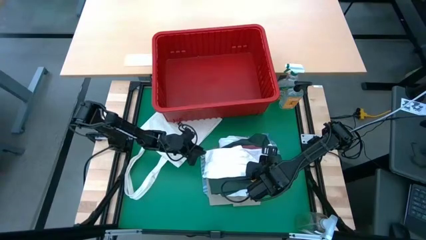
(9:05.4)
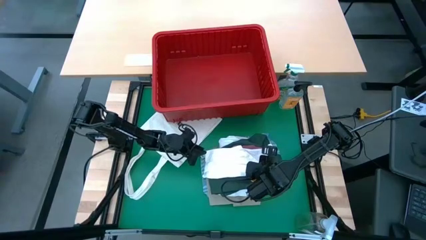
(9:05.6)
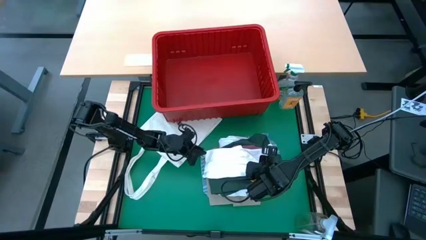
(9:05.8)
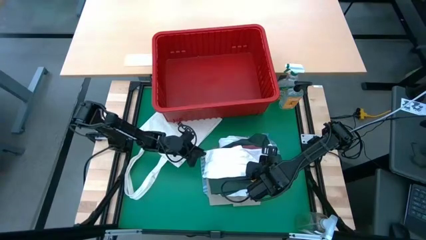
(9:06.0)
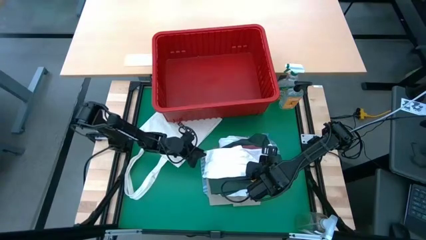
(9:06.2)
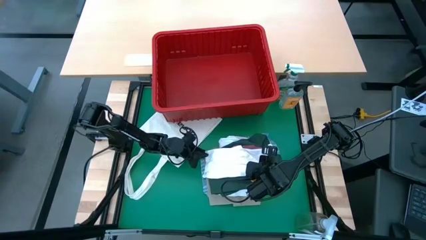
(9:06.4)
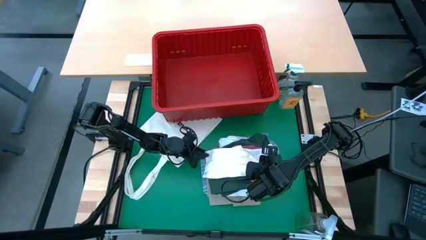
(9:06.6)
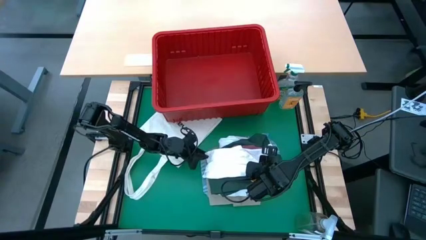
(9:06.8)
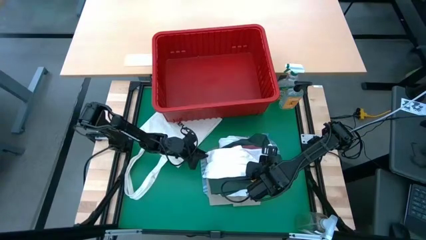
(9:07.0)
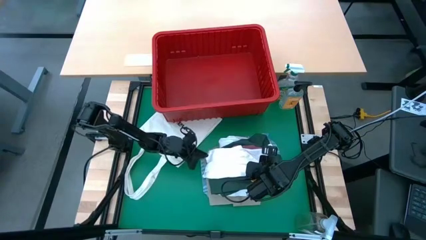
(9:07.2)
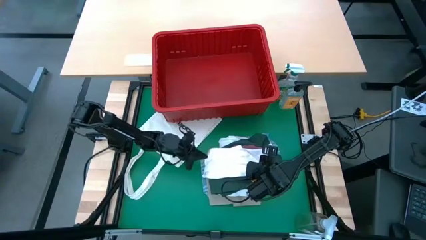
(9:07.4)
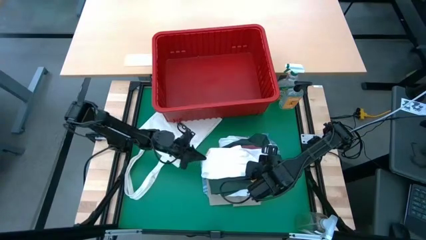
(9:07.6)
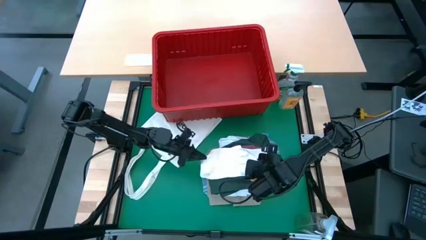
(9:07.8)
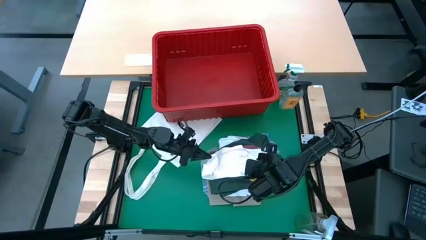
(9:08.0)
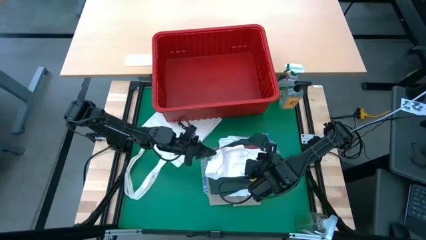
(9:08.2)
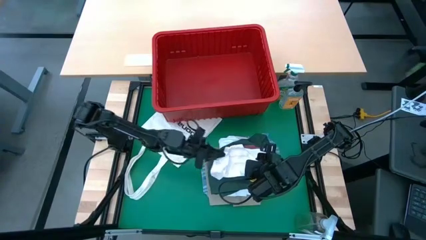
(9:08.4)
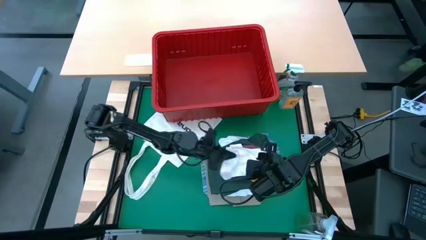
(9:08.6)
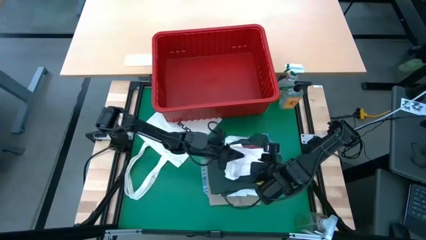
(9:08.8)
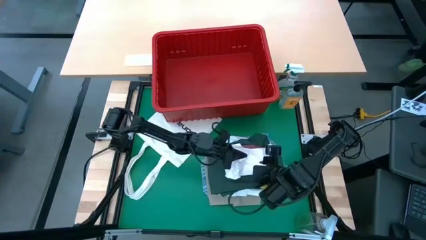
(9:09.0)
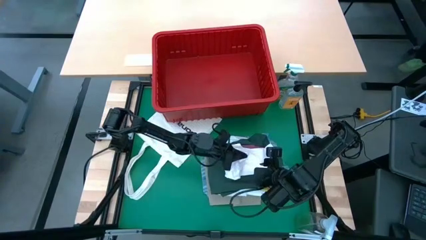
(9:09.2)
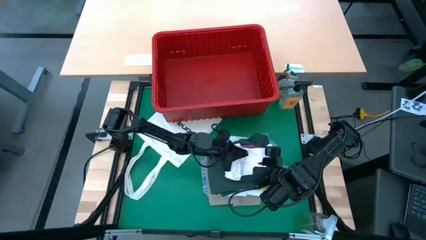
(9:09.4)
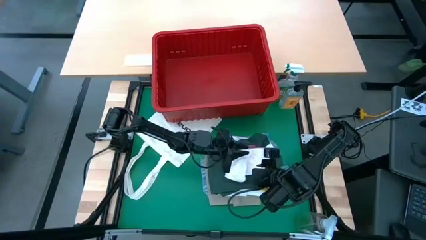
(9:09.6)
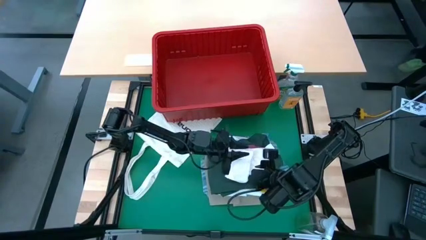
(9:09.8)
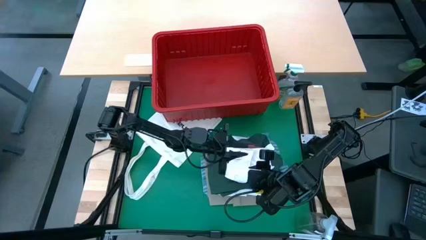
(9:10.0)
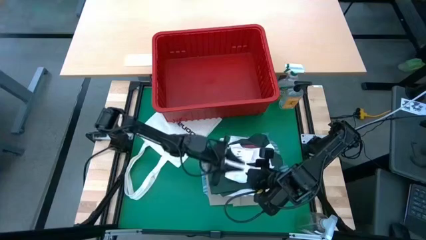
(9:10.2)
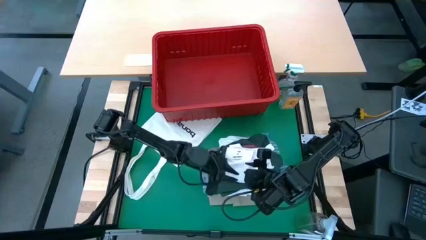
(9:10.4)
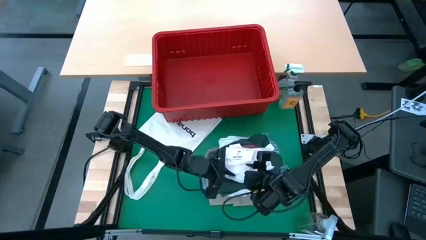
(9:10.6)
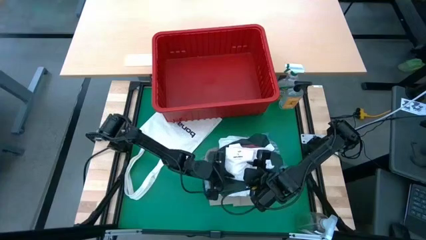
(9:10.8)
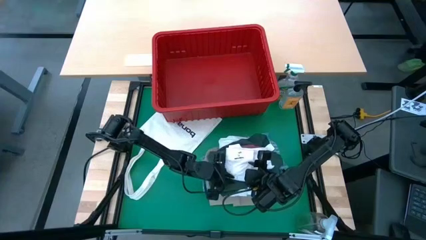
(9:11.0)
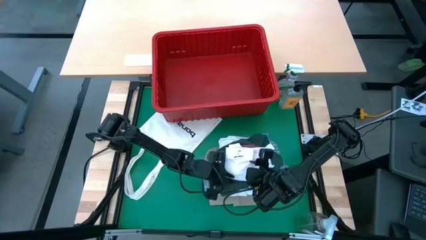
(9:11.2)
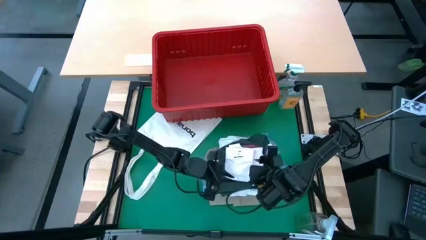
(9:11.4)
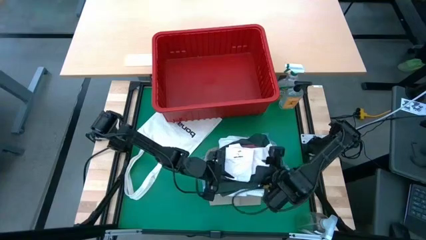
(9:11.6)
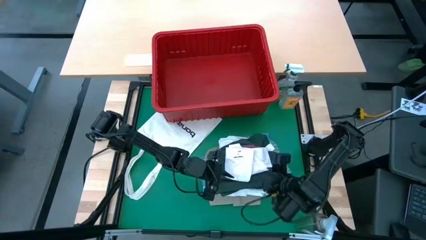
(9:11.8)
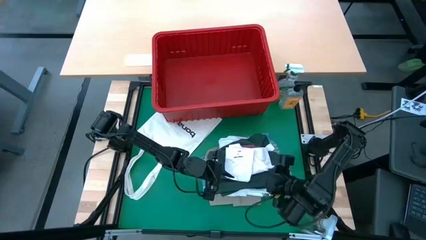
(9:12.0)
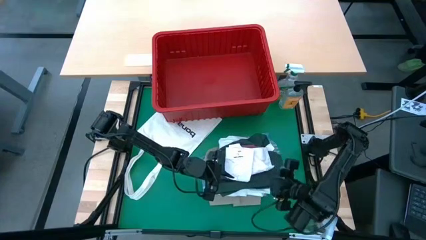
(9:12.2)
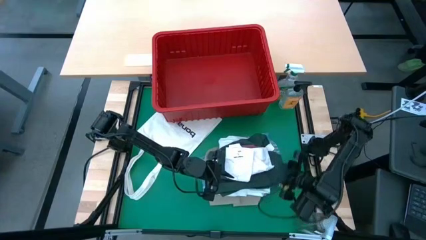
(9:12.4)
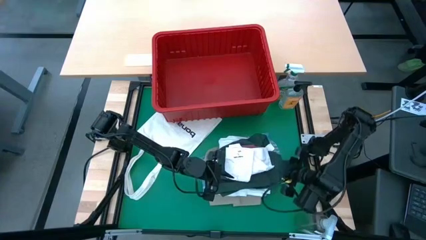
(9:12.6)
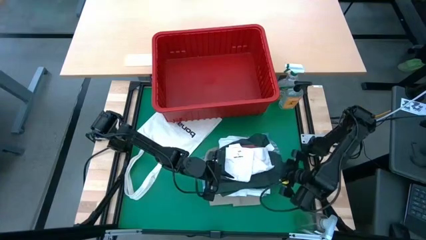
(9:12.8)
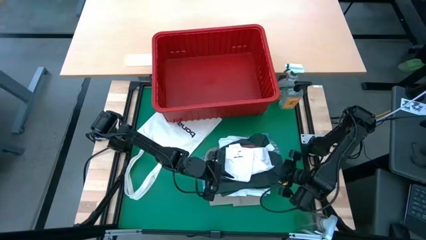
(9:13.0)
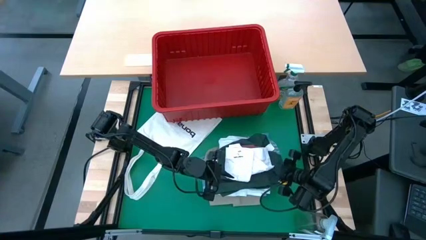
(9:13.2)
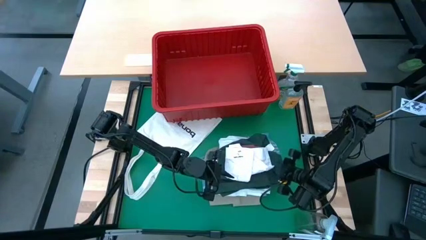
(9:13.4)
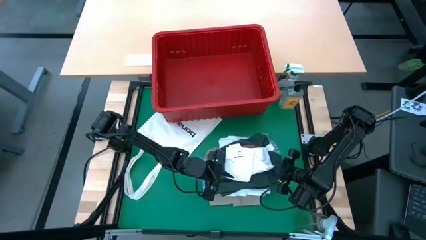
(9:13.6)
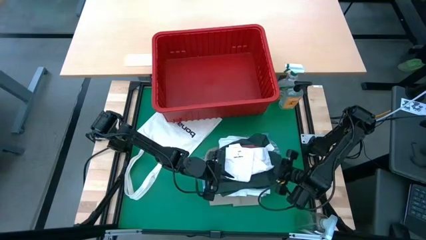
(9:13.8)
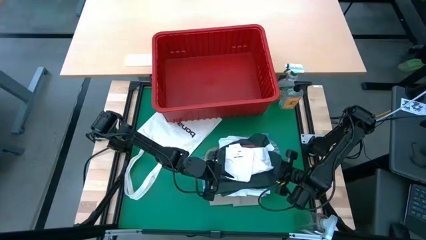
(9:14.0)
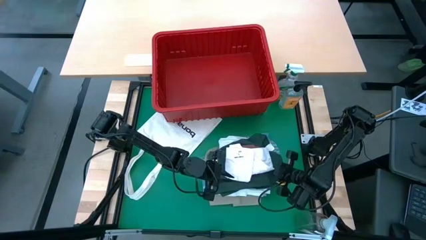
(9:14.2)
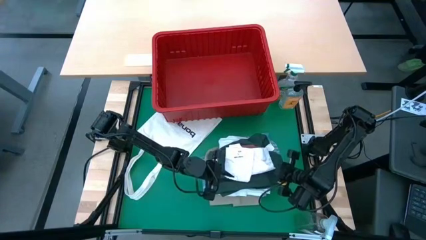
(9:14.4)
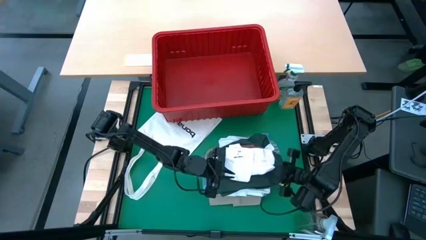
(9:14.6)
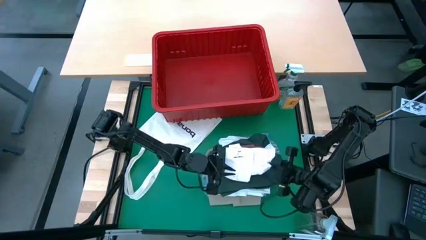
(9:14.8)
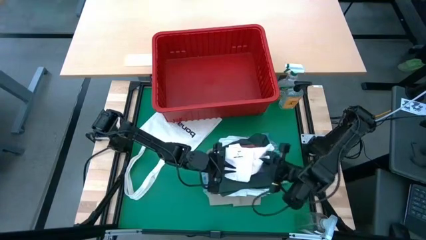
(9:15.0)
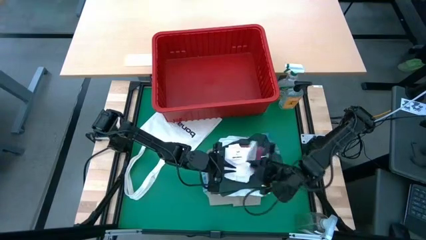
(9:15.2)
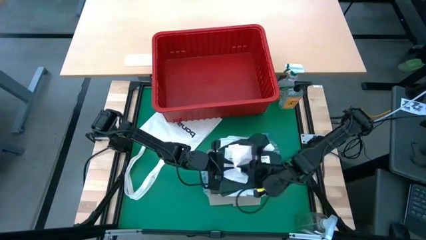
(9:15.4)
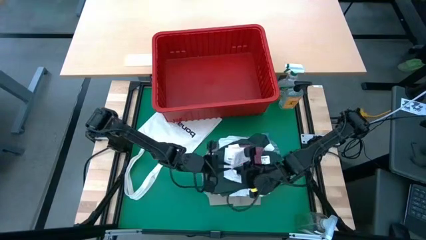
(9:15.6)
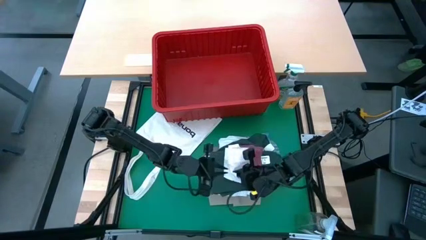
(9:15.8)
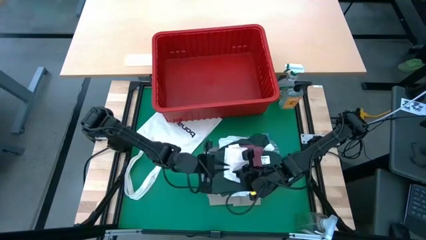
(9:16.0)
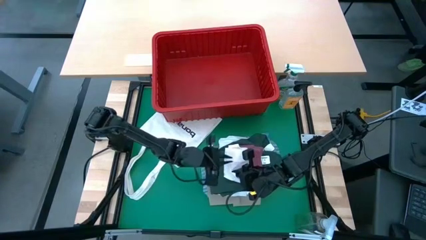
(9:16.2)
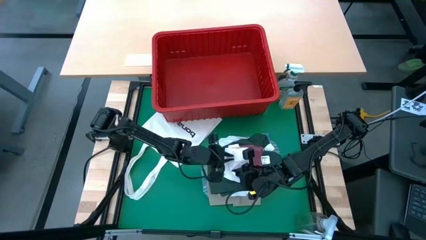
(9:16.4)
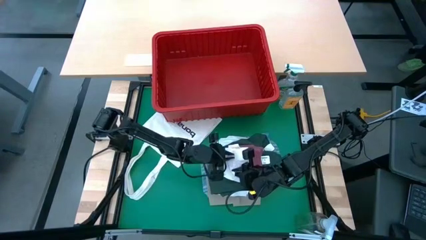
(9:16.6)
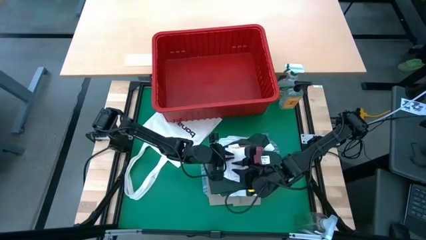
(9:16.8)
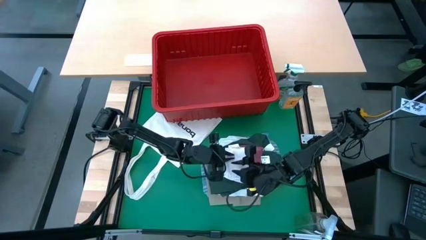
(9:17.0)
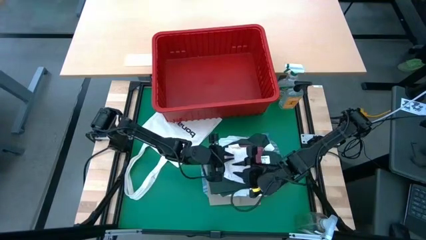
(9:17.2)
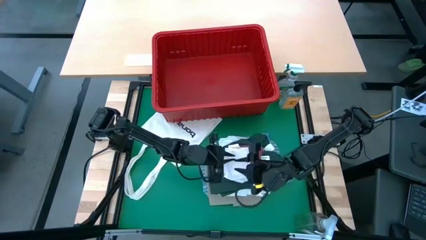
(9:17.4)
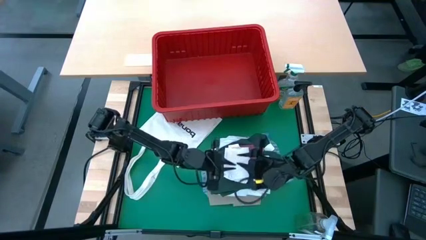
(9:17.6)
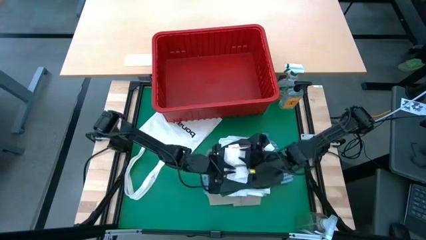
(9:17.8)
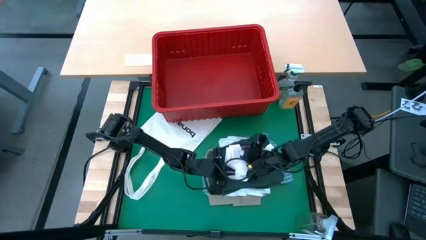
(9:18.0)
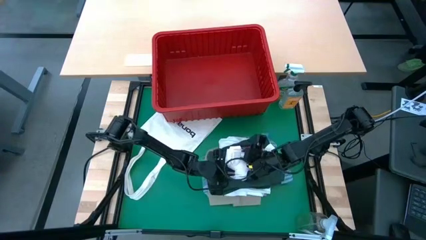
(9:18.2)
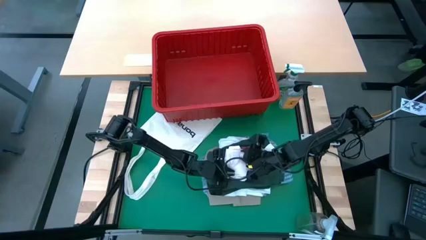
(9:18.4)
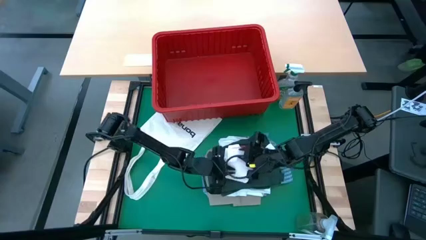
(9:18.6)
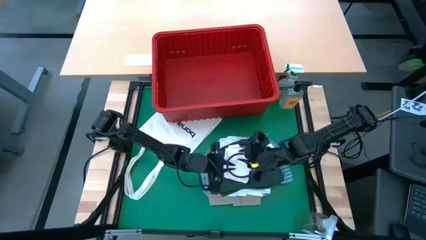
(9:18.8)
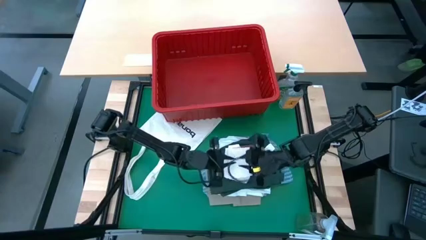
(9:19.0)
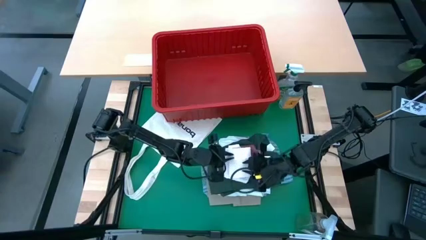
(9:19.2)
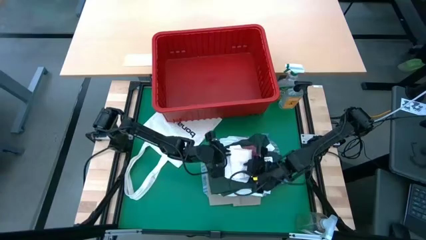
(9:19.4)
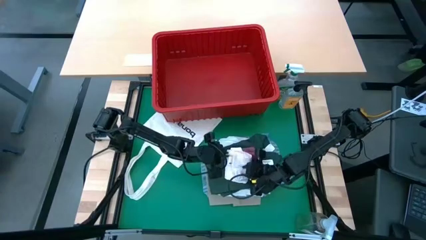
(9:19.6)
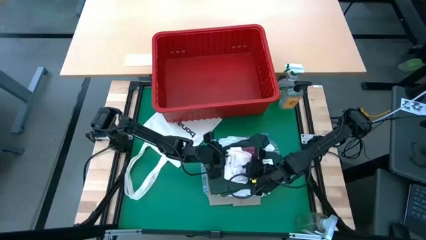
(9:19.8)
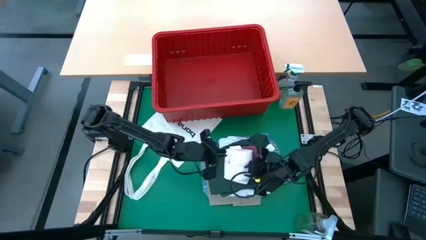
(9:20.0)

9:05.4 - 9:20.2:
Task: Fold Laundry from Bin
Fold the white underwear
